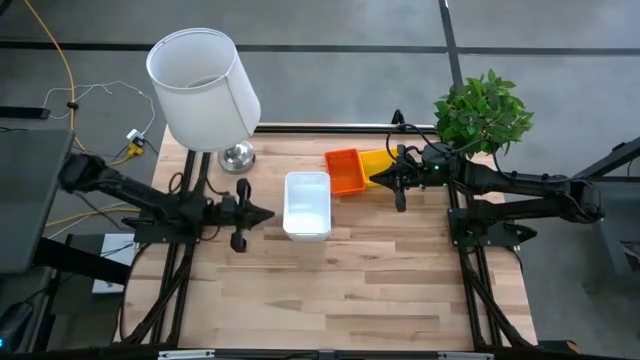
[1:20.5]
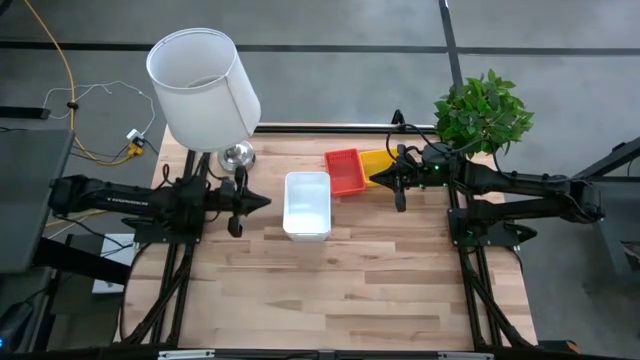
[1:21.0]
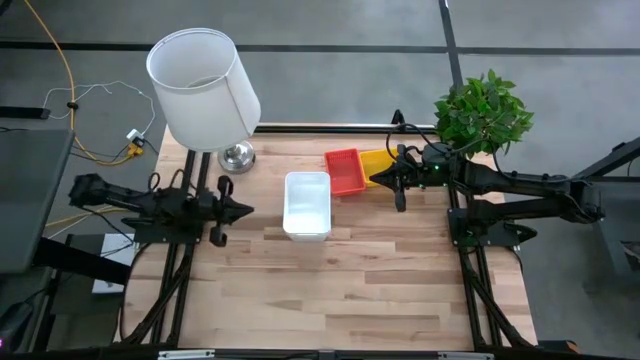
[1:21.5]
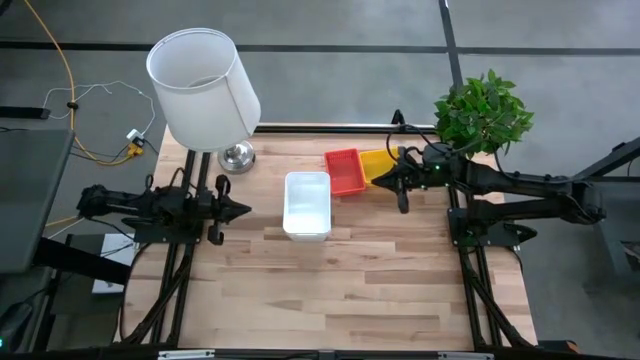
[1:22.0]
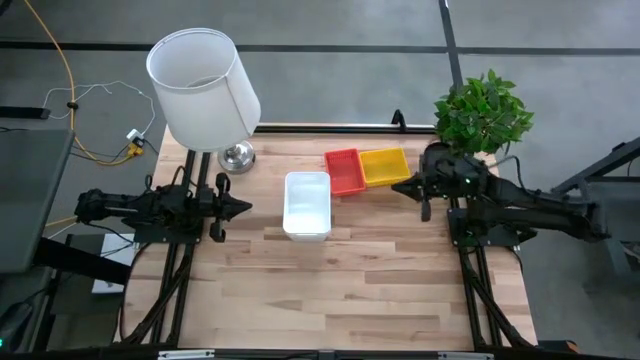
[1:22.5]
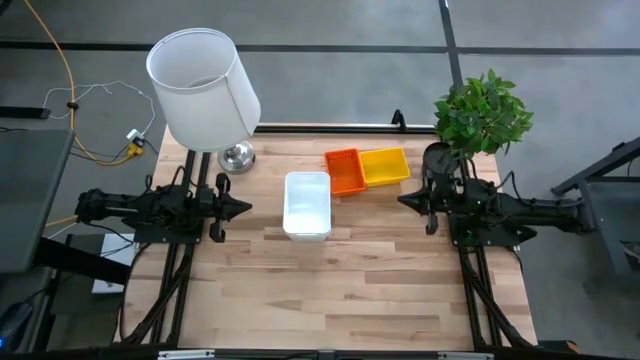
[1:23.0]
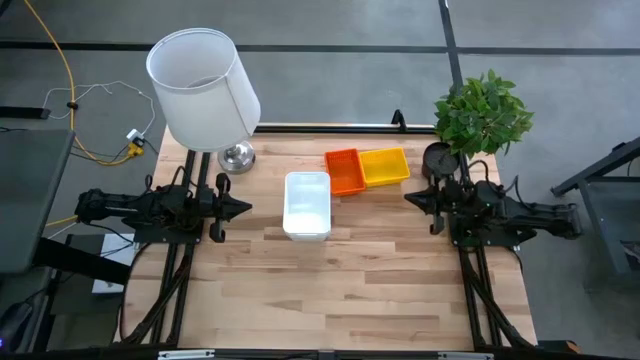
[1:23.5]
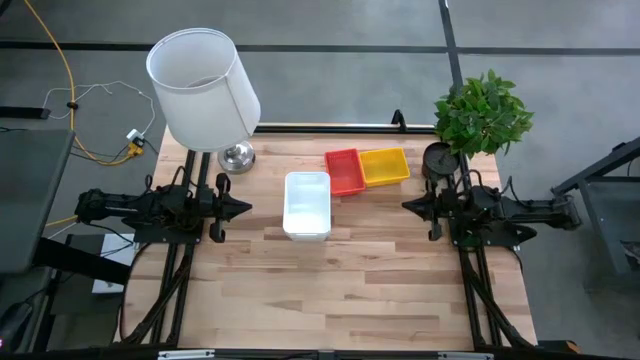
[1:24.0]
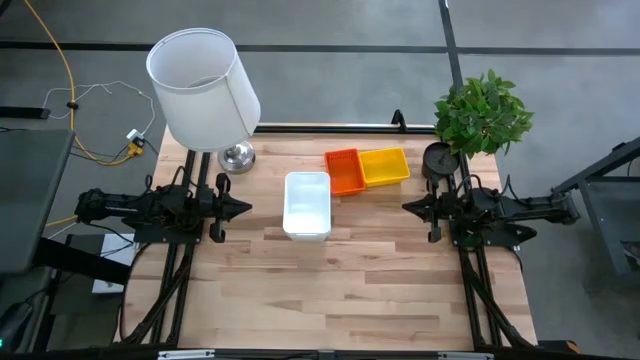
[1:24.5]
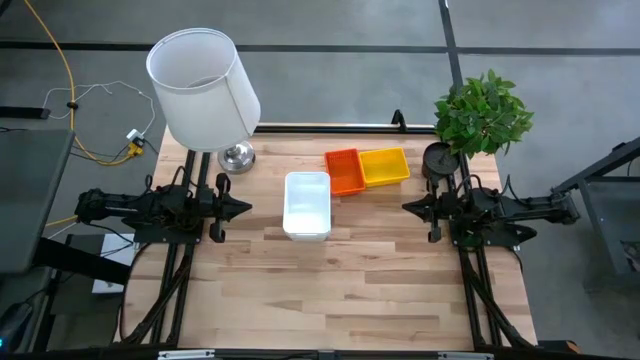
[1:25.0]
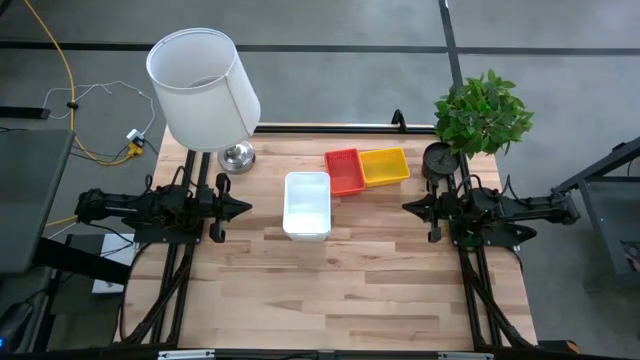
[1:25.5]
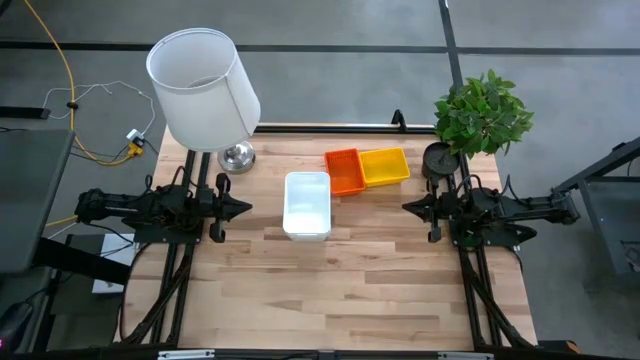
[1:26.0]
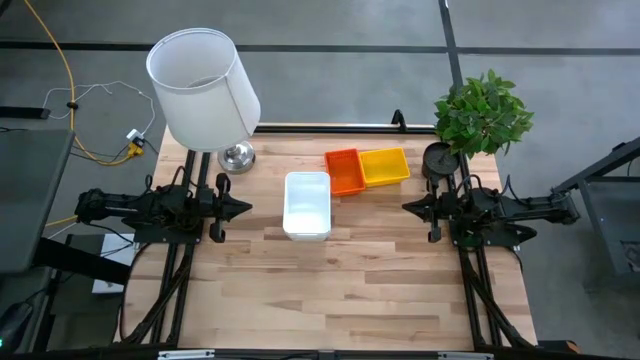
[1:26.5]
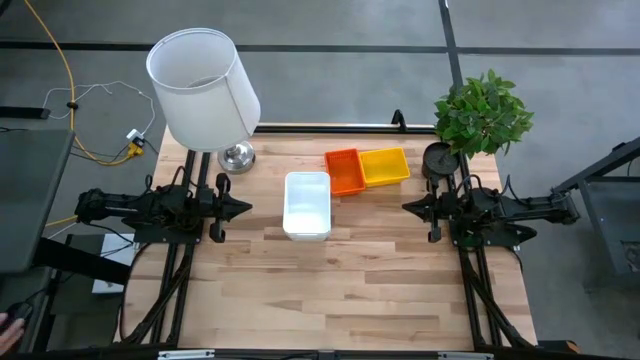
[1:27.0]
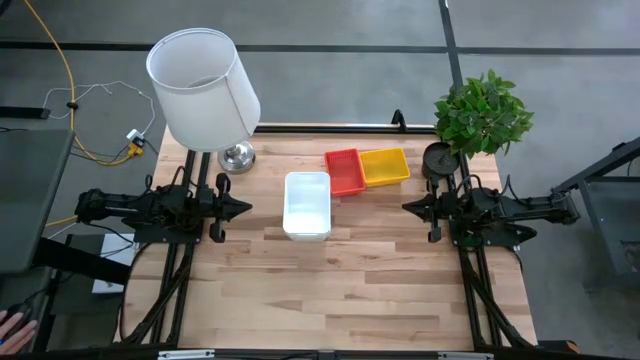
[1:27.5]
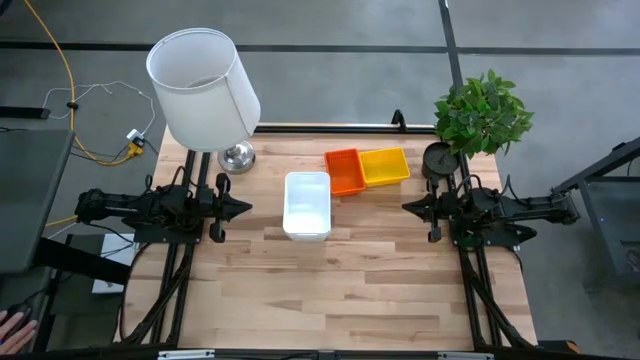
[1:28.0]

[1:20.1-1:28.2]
Return to Home Position

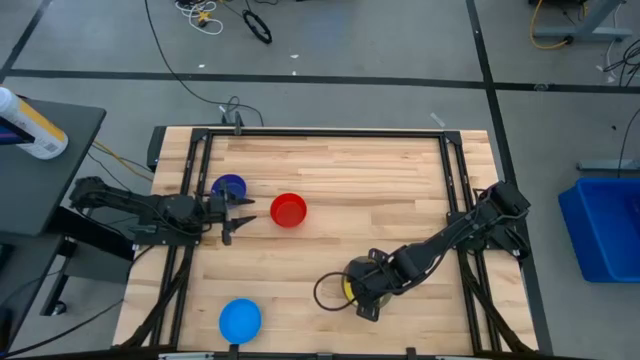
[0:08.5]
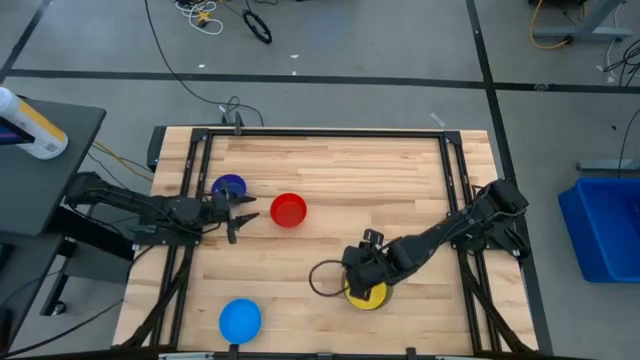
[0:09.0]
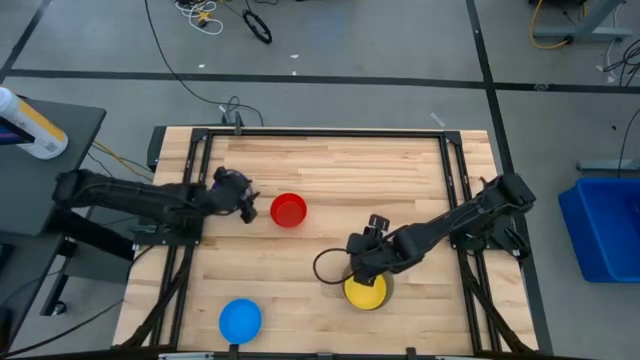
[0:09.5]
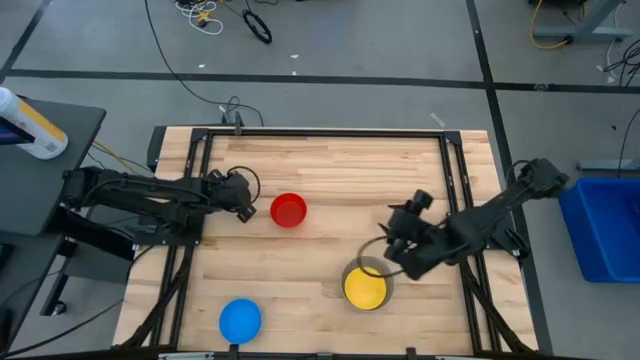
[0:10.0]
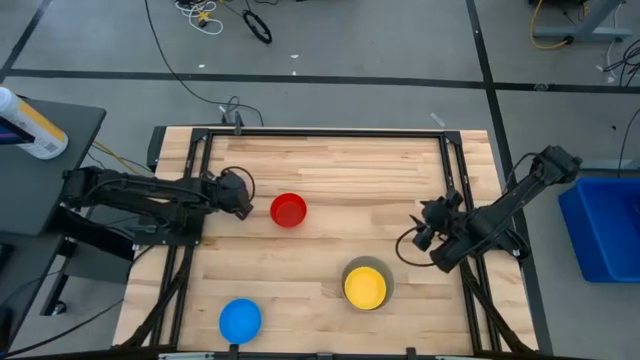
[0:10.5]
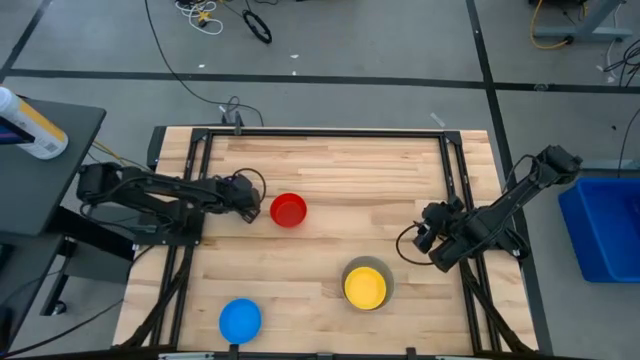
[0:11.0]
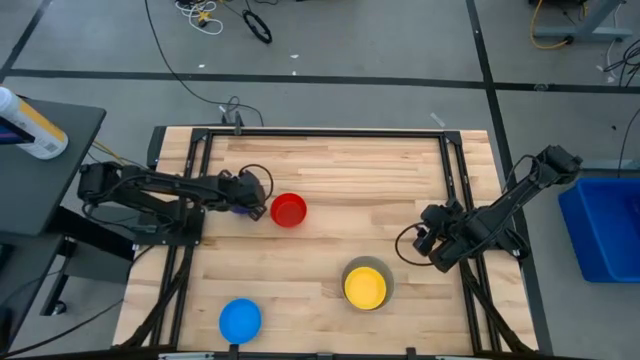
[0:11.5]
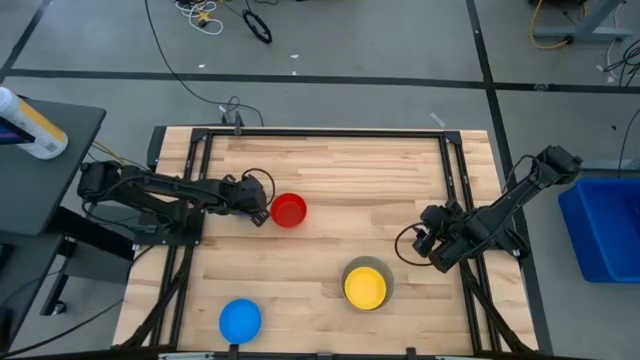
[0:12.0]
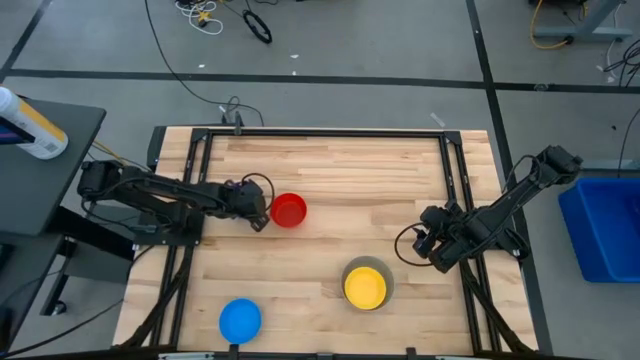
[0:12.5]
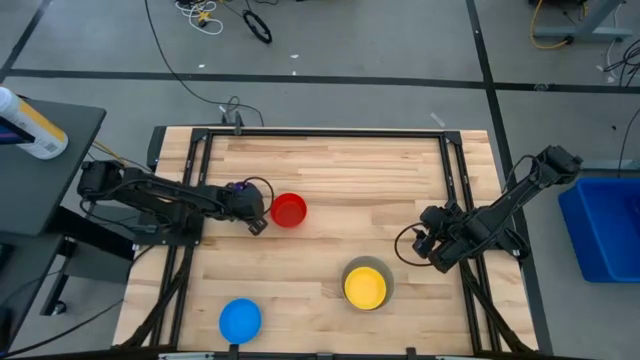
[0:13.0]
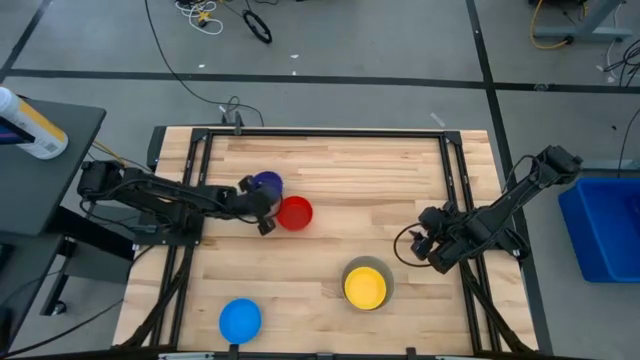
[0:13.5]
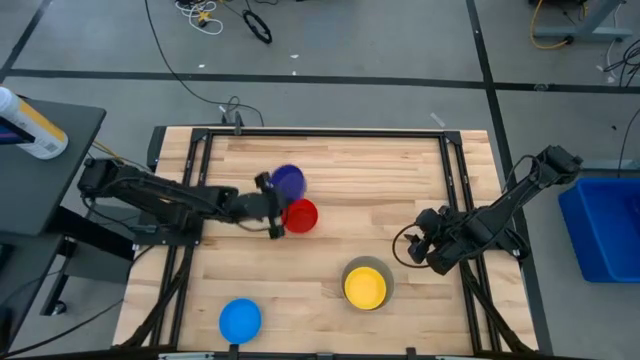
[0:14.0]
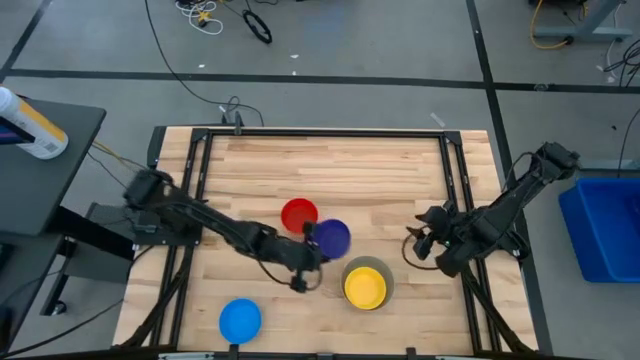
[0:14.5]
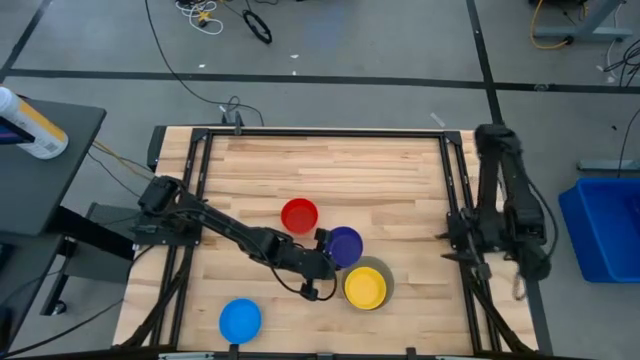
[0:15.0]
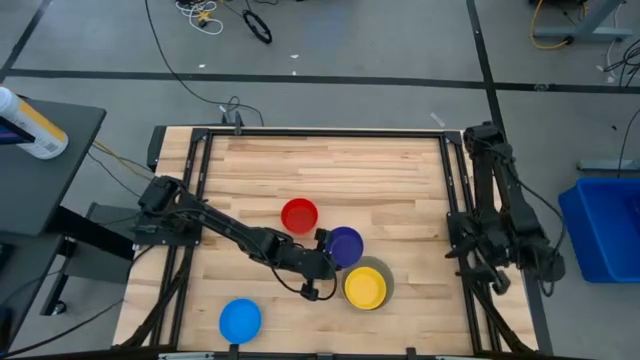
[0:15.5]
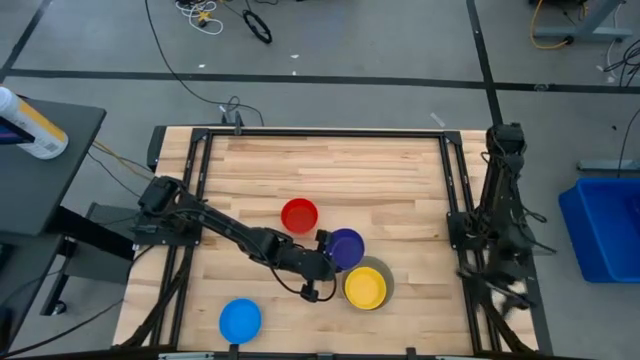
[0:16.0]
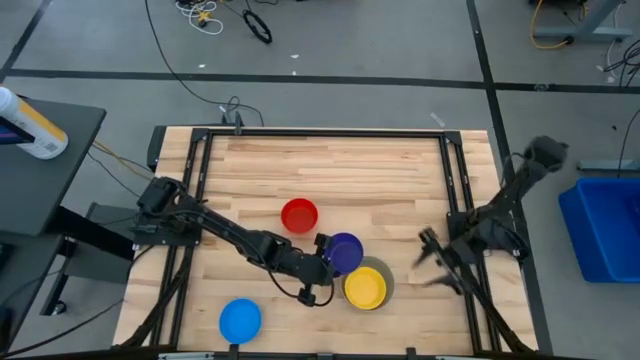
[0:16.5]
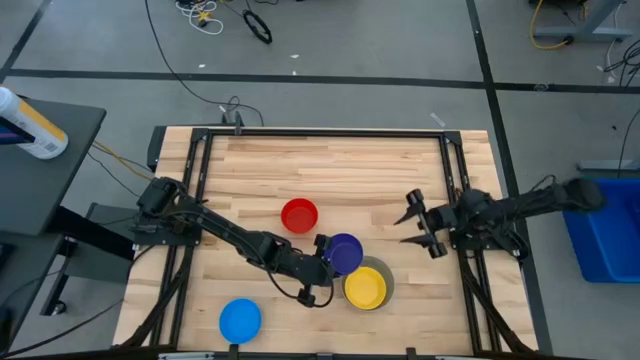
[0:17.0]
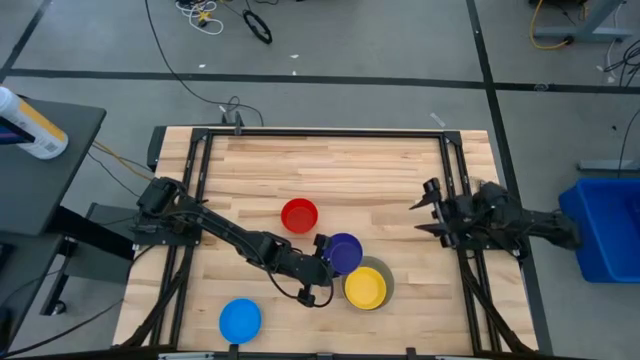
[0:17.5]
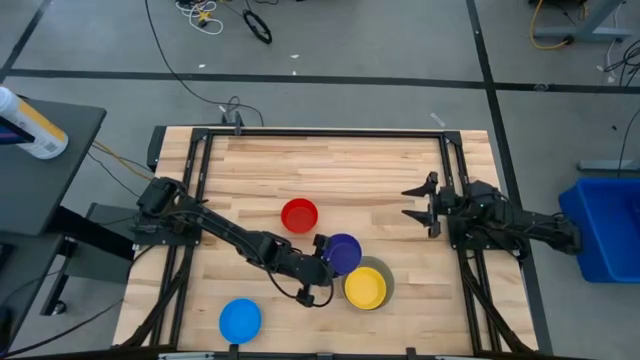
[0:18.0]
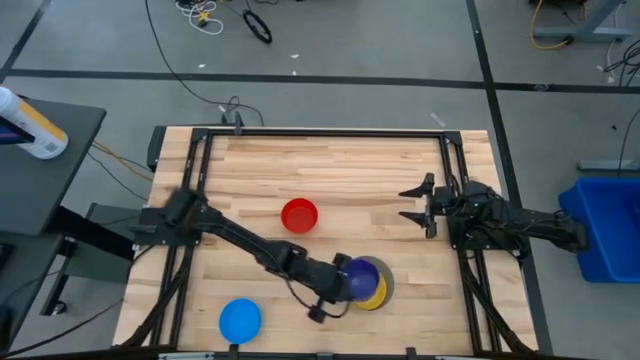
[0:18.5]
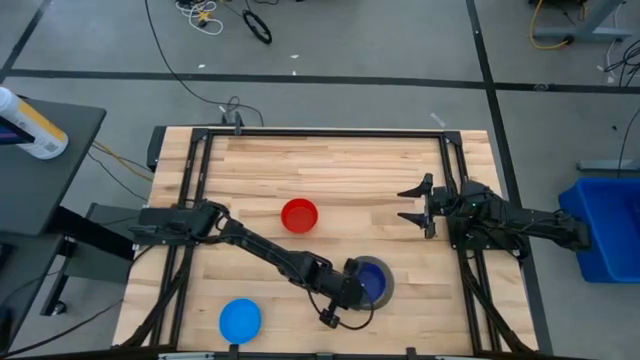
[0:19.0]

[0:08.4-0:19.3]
Stack the dark blue bowl on the yellow bowl

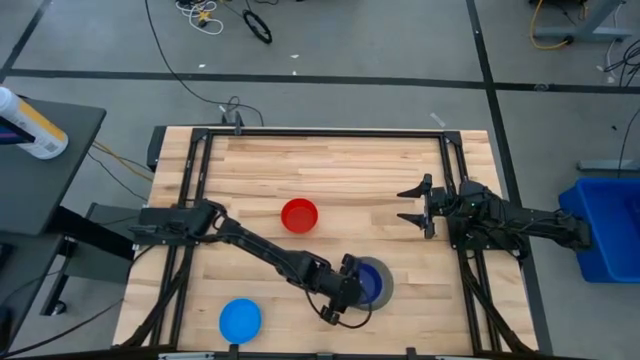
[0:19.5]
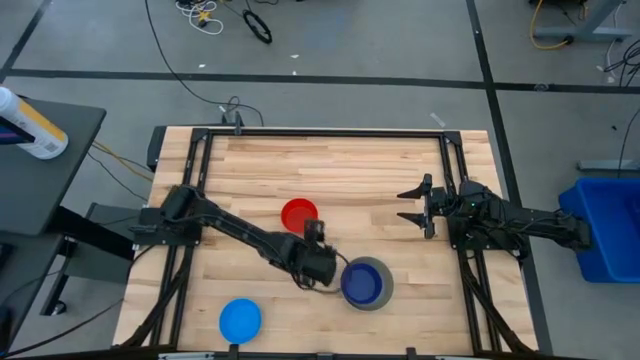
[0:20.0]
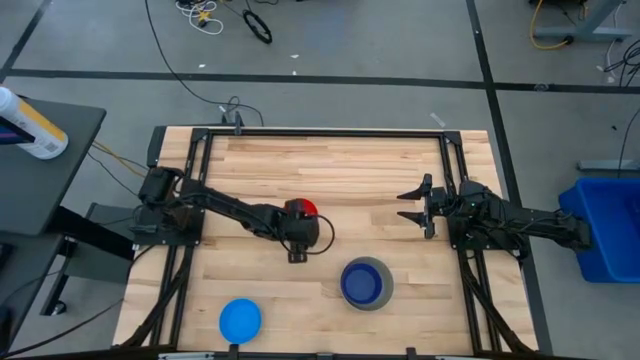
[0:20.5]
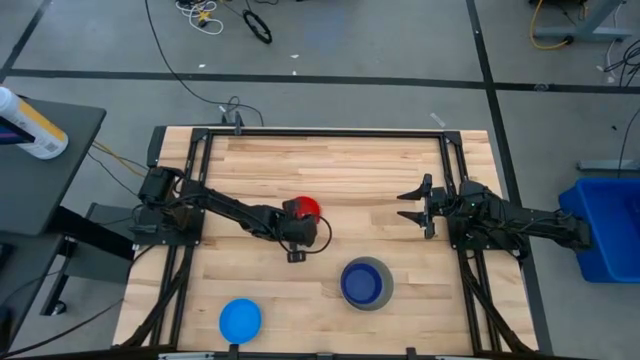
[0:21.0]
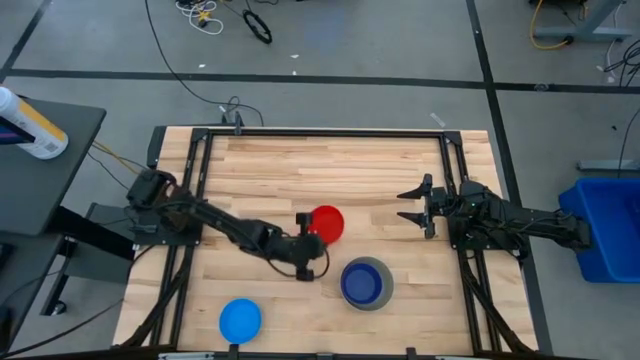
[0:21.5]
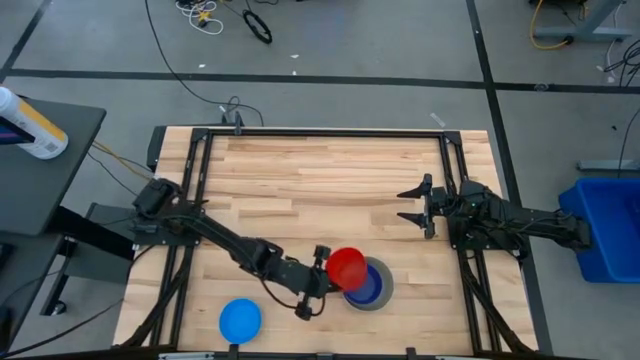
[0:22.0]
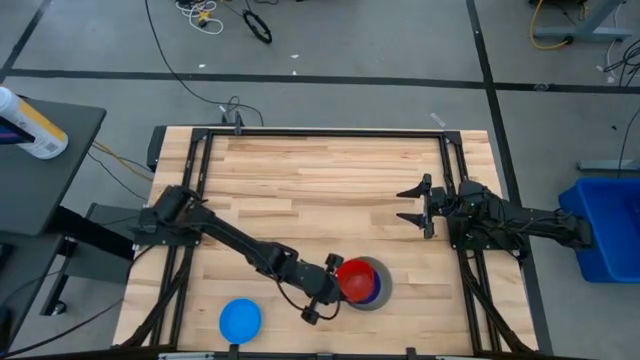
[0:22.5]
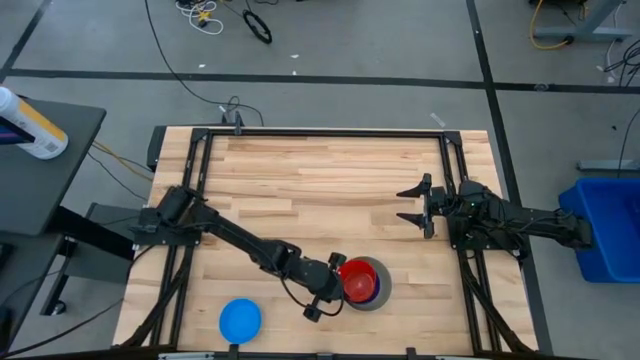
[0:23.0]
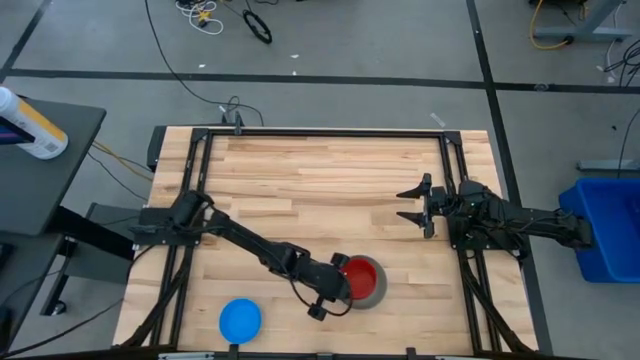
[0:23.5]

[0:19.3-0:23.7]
Stack the red bowl on the dark blue bowl
